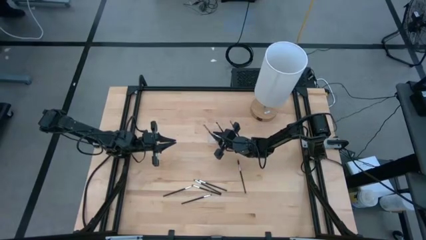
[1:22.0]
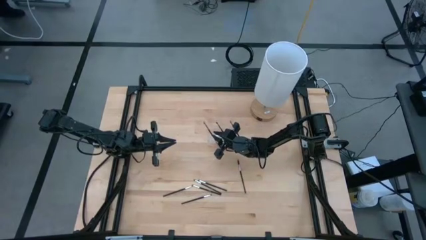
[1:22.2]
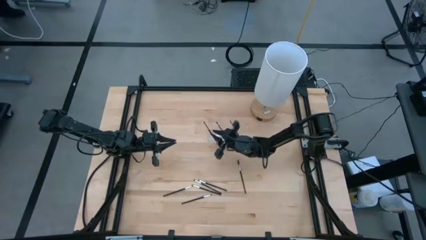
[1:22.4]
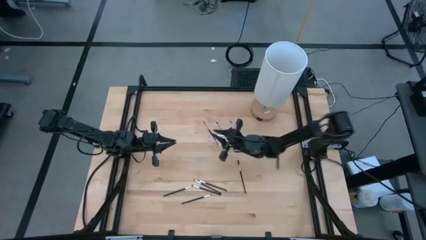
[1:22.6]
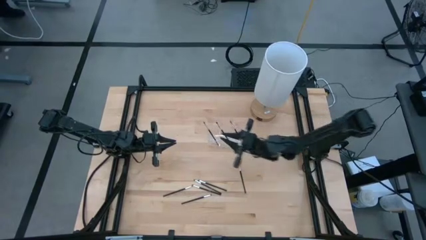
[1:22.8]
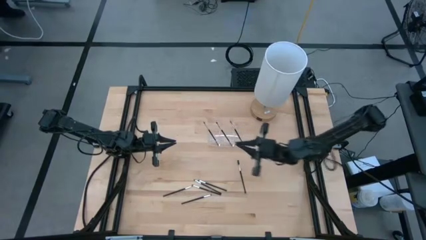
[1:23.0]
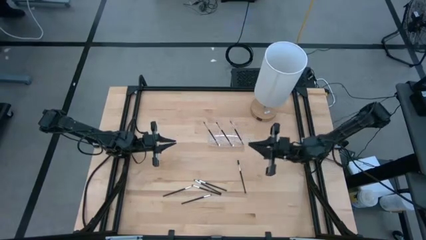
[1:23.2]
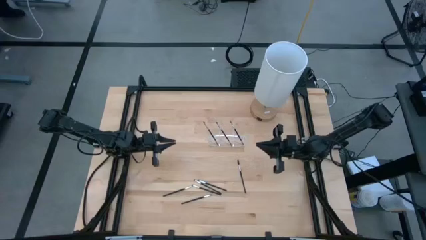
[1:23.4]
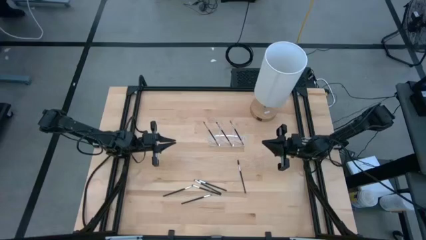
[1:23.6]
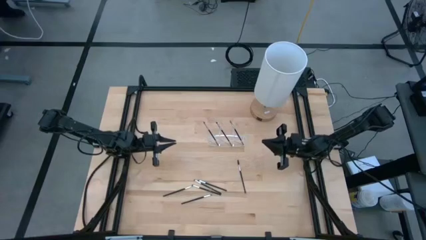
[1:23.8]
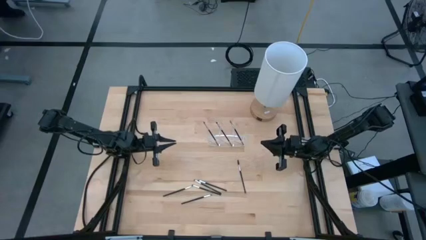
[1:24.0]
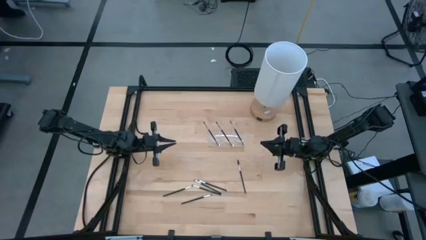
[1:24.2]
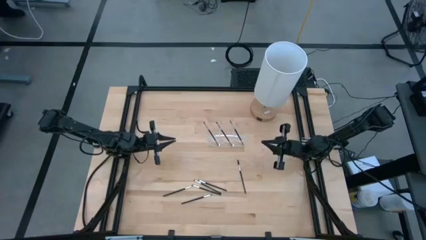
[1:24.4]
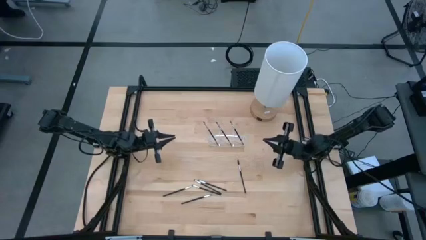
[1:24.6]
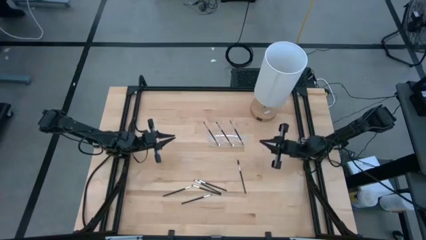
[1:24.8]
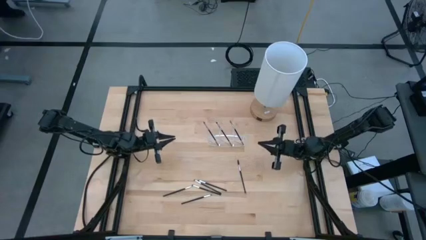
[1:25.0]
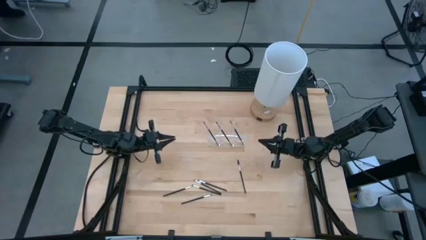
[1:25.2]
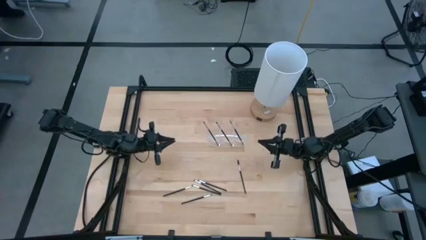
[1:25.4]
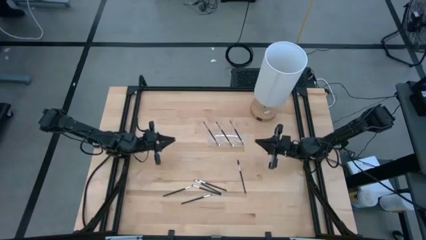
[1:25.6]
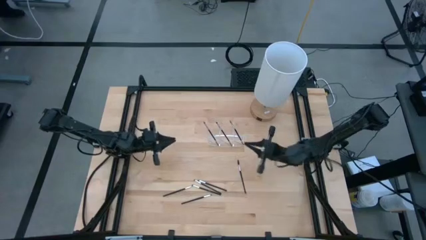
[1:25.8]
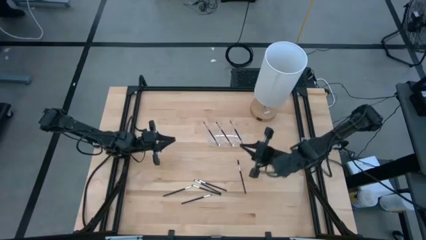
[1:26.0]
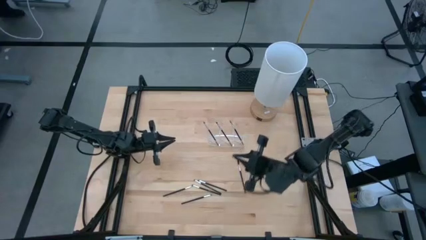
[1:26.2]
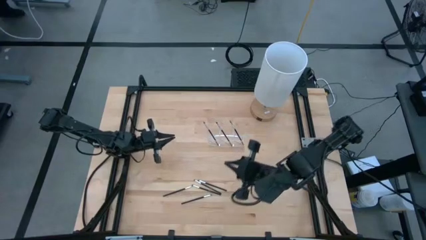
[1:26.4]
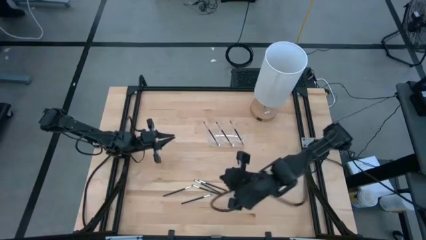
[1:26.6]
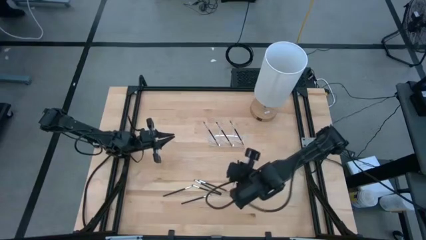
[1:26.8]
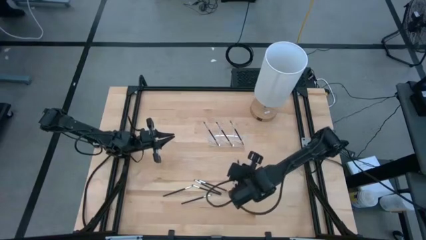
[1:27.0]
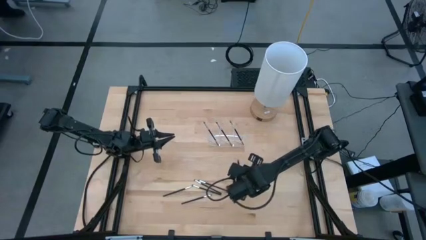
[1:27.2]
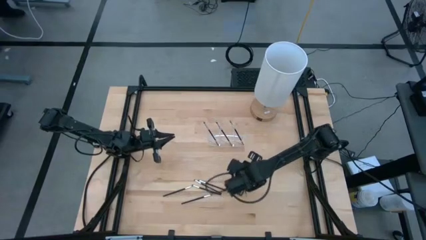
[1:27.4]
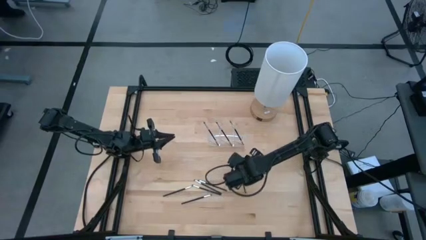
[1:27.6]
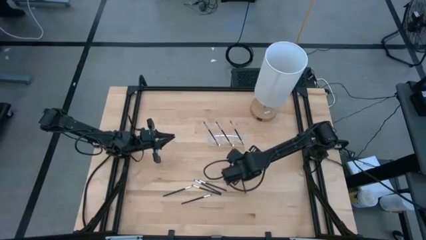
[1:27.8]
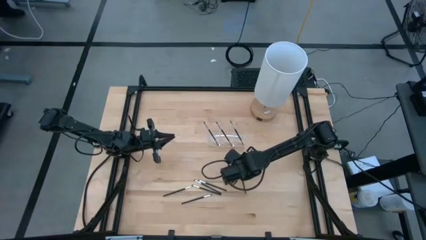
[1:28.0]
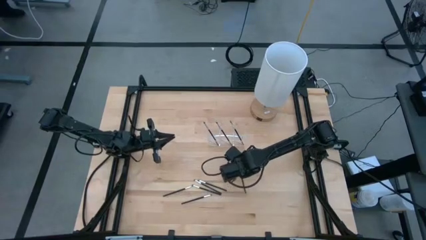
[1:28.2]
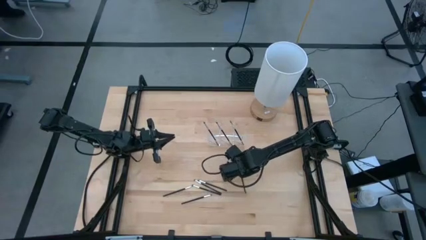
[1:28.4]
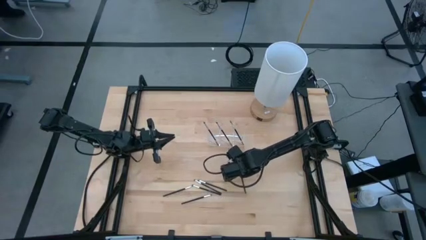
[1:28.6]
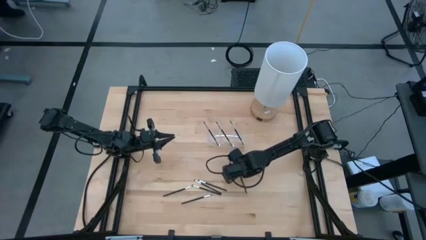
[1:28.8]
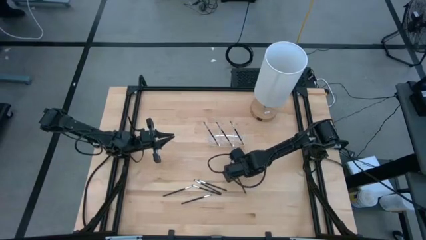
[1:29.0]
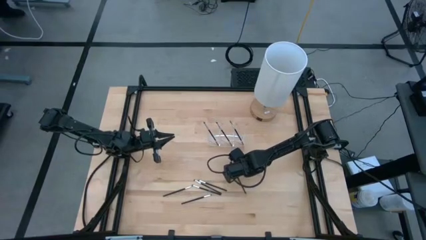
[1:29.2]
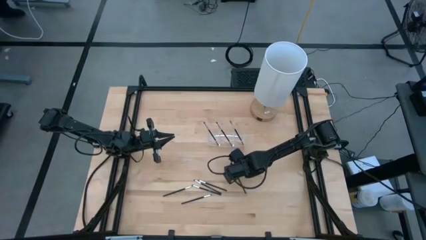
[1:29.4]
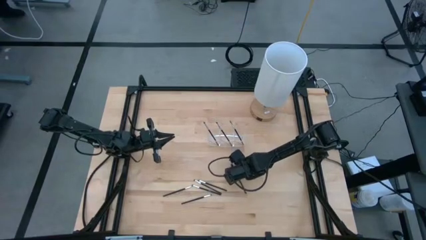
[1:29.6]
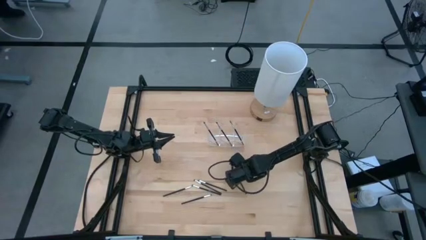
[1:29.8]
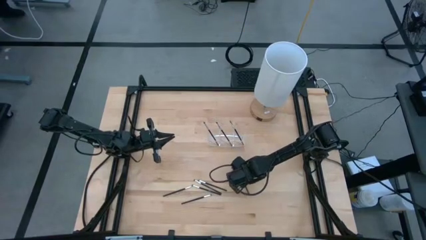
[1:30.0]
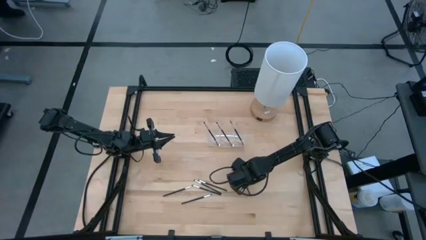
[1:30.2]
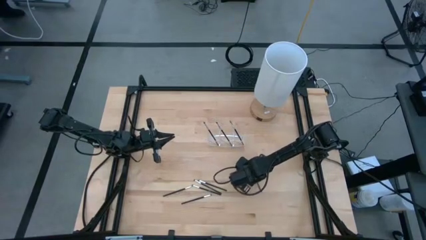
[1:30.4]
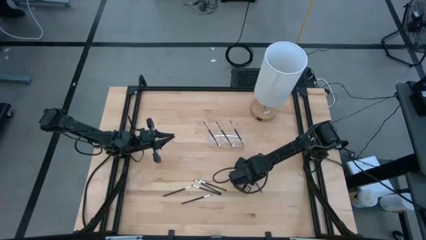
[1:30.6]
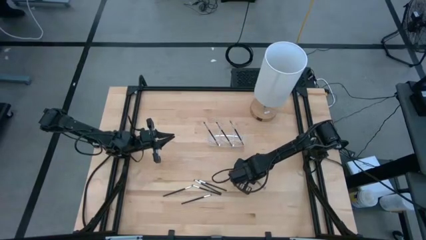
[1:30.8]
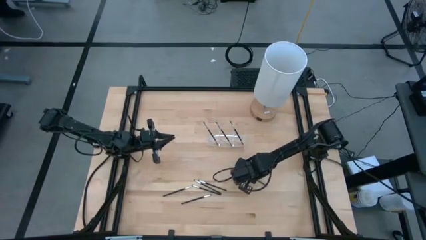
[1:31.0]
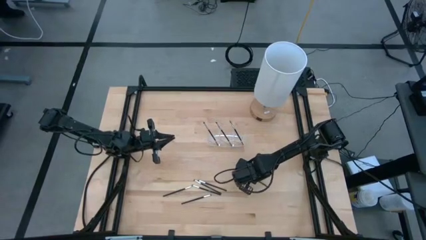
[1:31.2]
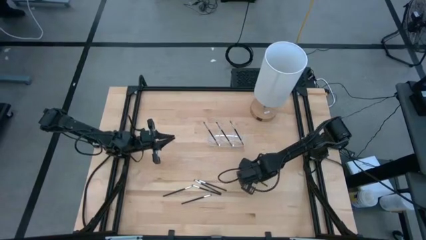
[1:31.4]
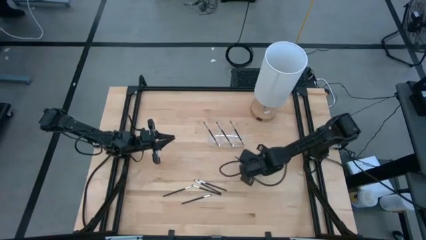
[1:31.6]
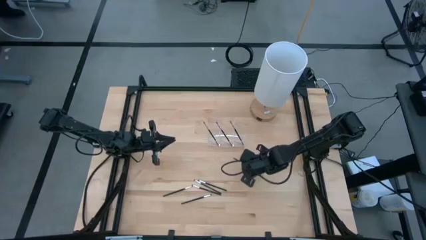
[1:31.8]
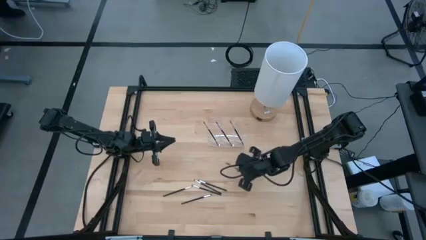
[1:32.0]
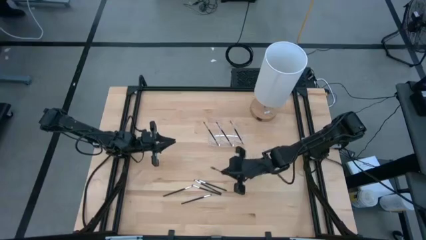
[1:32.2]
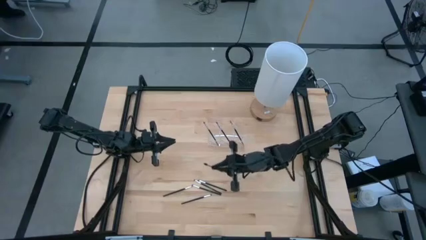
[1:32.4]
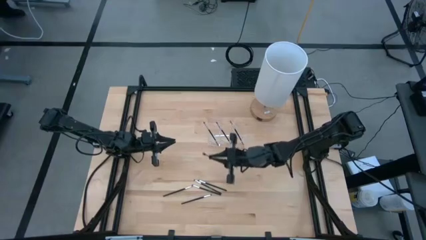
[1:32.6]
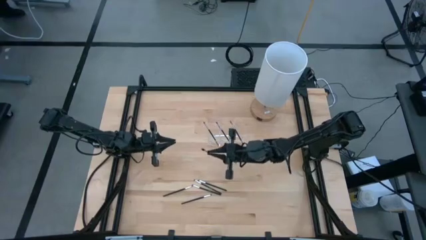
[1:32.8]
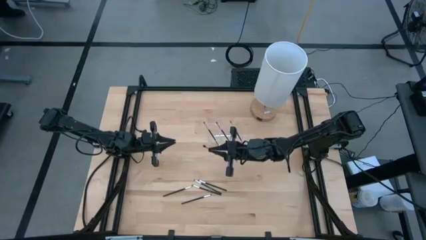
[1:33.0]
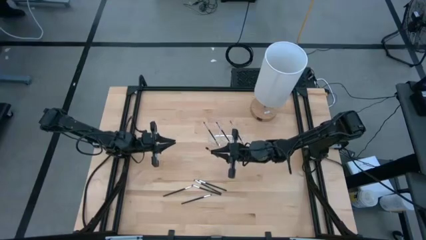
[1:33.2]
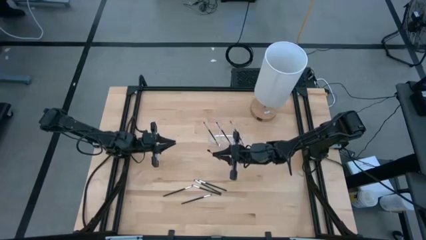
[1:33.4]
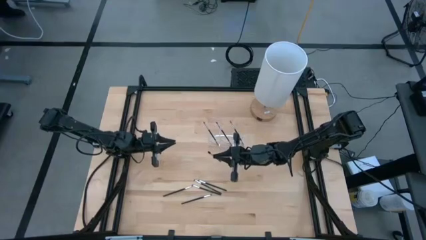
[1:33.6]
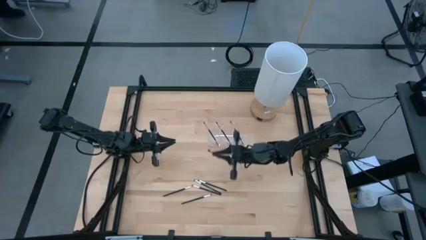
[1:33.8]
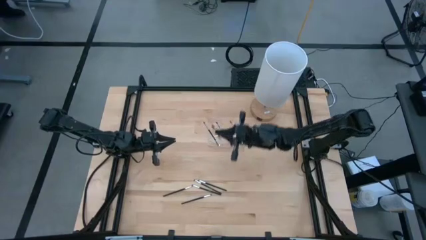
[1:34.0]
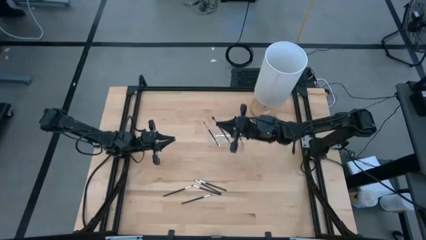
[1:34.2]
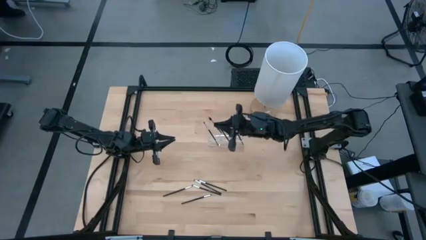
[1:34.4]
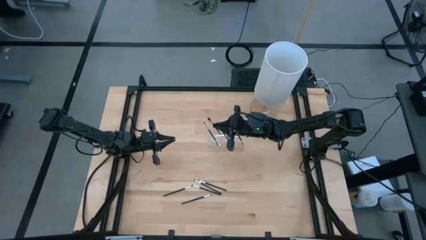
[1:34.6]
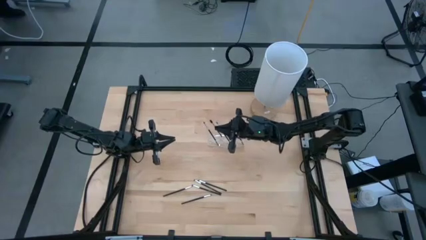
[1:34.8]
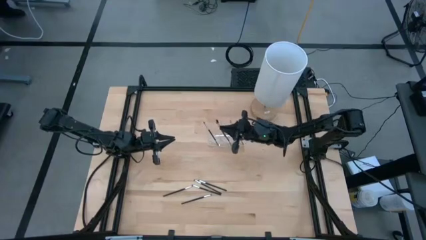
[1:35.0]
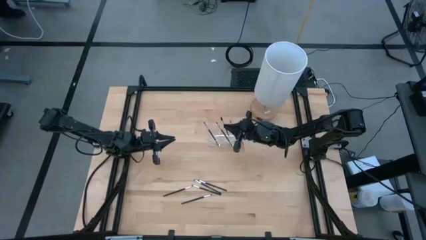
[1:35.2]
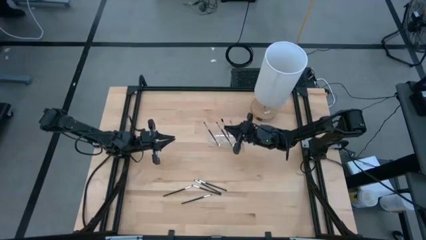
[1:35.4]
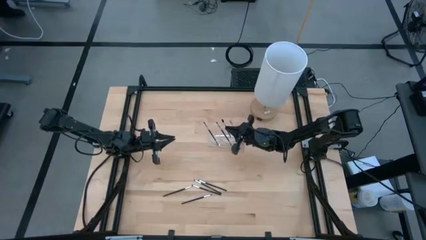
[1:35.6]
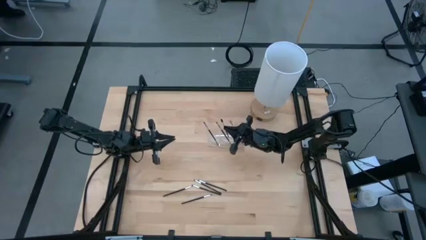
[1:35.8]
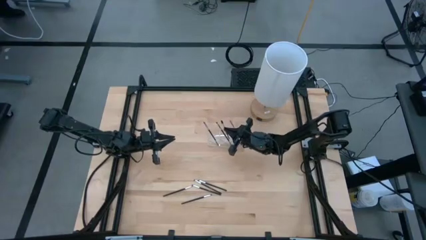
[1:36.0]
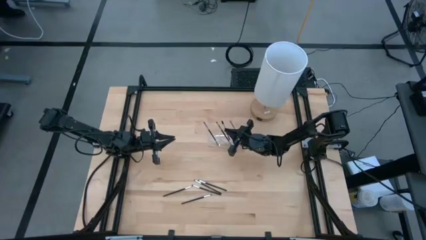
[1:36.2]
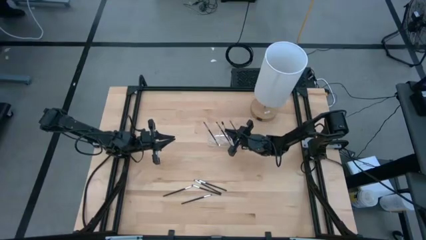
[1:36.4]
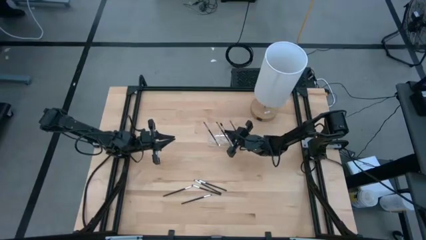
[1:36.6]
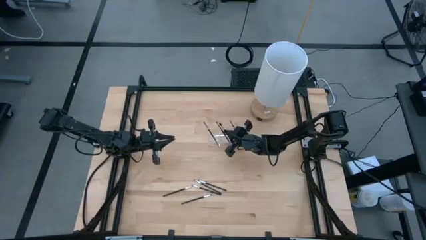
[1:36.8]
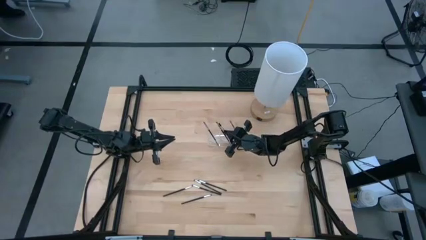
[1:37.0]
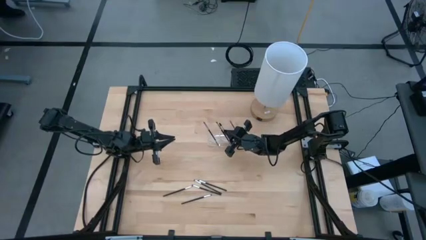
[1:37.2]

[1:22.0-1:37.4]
Task: Put items in baskets/containers
Put the brow brush into the middle section of the transparent organizer
